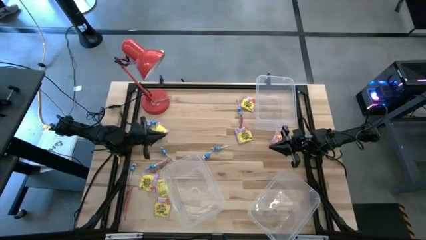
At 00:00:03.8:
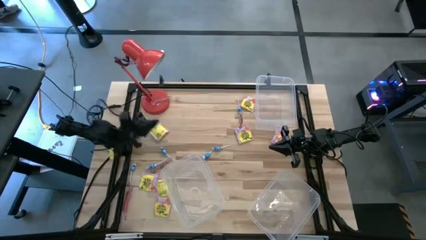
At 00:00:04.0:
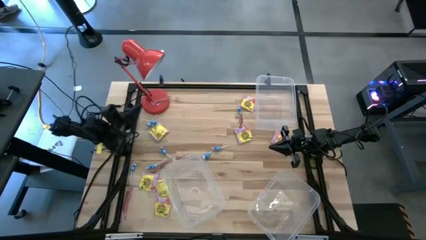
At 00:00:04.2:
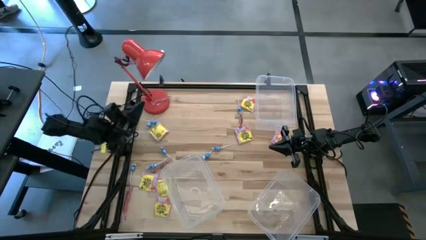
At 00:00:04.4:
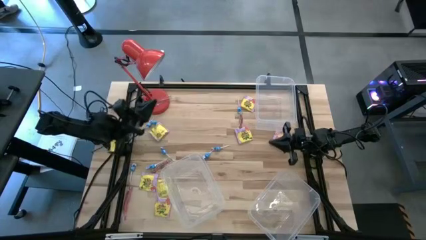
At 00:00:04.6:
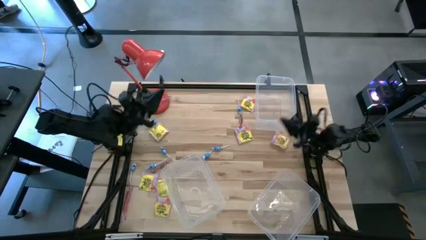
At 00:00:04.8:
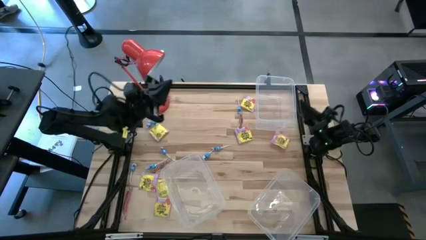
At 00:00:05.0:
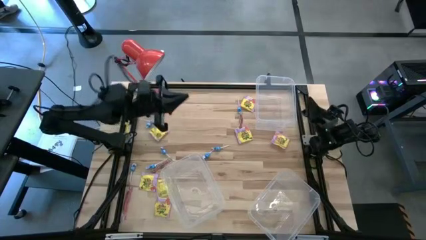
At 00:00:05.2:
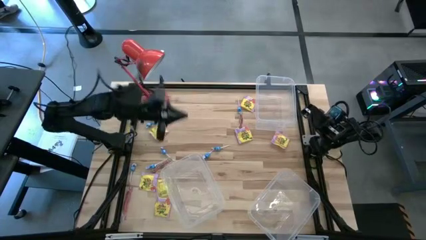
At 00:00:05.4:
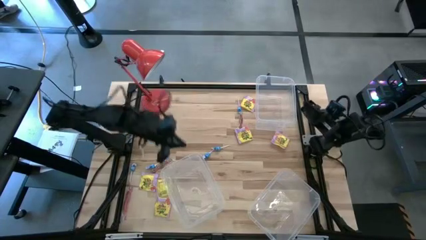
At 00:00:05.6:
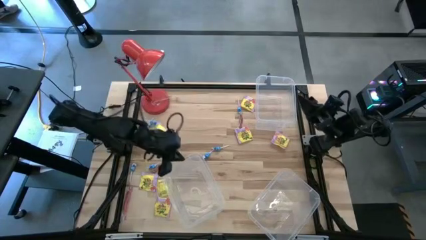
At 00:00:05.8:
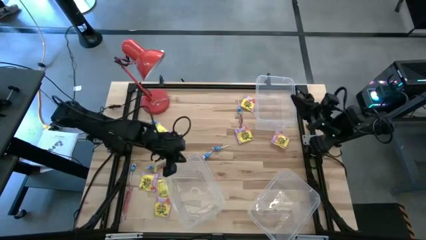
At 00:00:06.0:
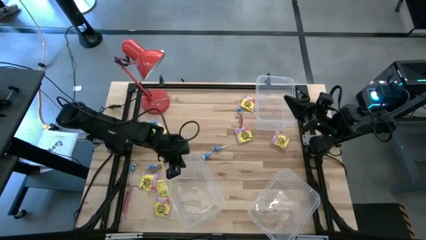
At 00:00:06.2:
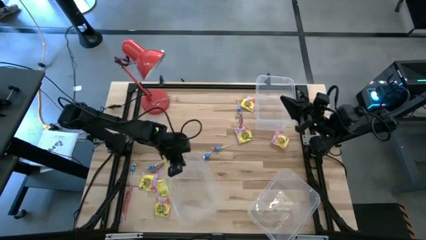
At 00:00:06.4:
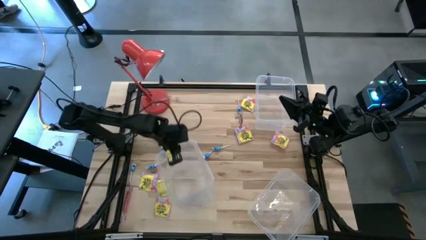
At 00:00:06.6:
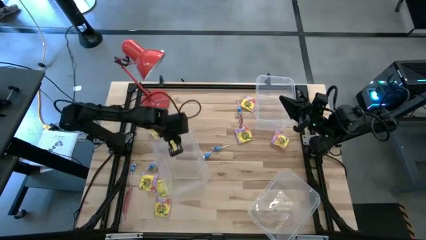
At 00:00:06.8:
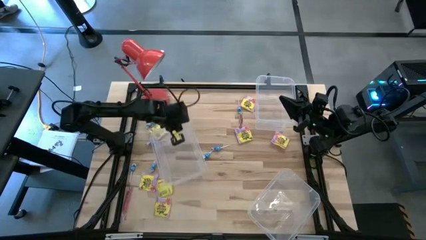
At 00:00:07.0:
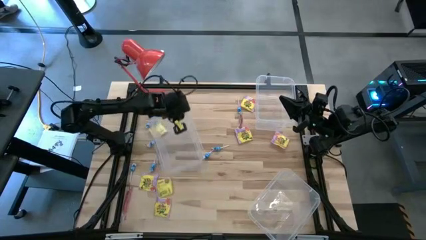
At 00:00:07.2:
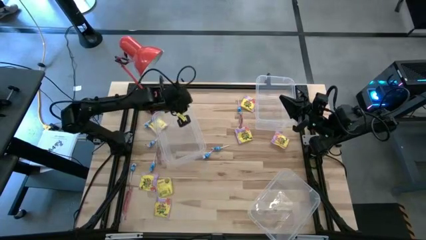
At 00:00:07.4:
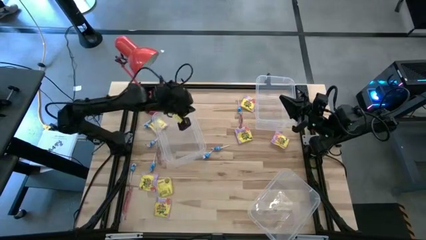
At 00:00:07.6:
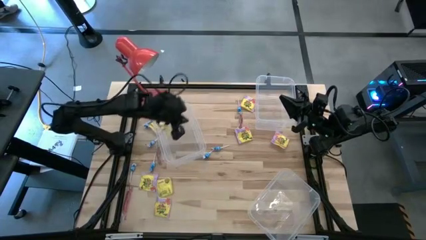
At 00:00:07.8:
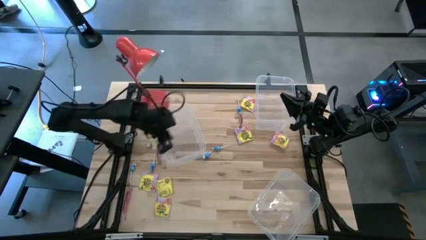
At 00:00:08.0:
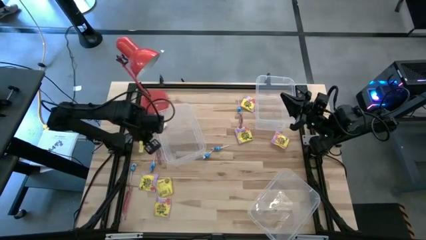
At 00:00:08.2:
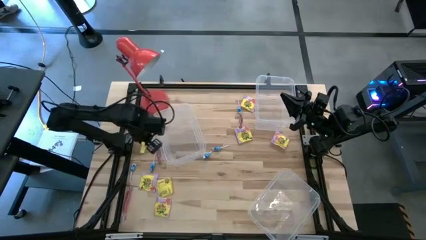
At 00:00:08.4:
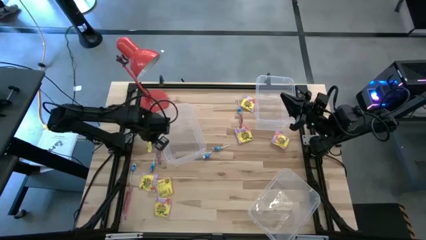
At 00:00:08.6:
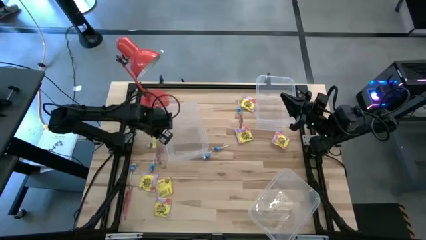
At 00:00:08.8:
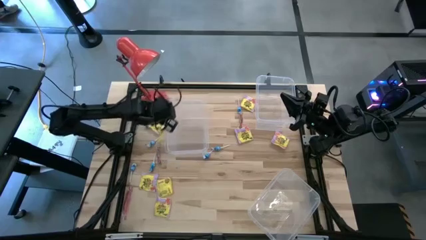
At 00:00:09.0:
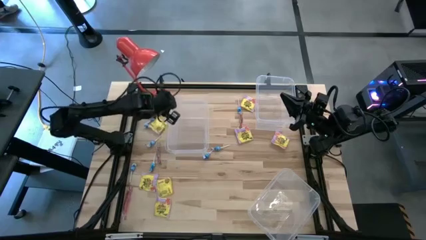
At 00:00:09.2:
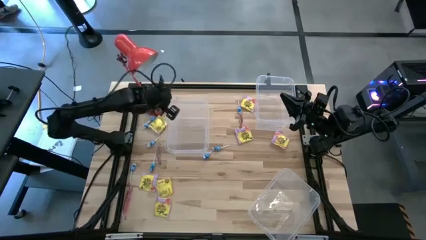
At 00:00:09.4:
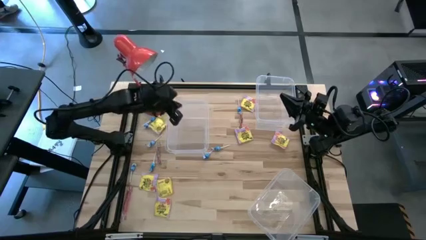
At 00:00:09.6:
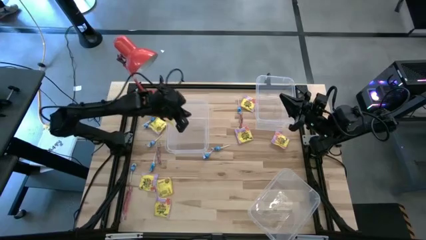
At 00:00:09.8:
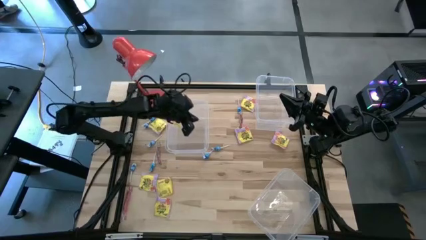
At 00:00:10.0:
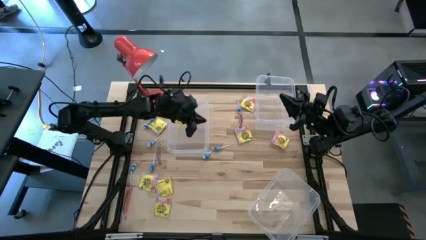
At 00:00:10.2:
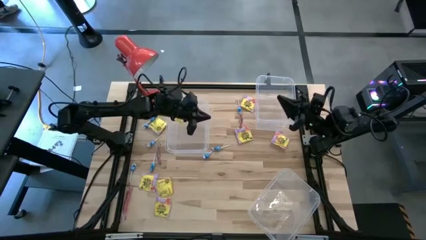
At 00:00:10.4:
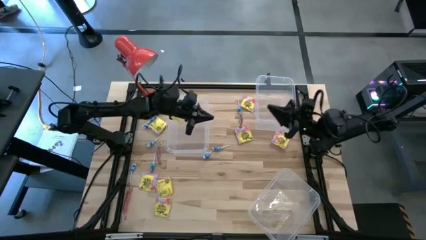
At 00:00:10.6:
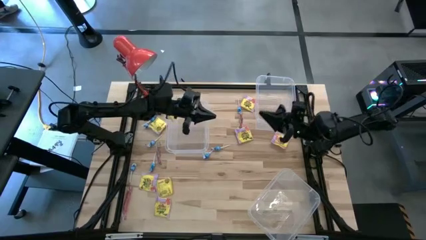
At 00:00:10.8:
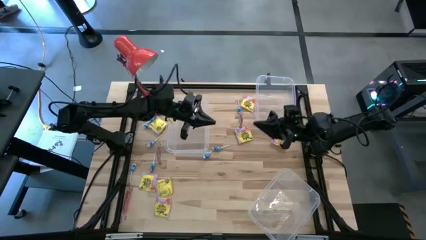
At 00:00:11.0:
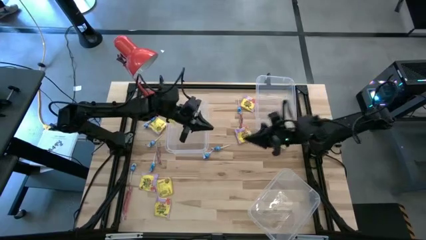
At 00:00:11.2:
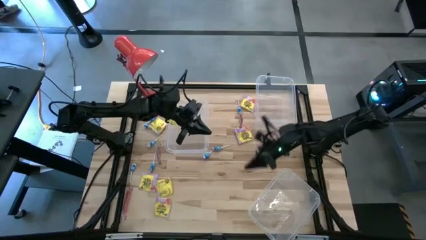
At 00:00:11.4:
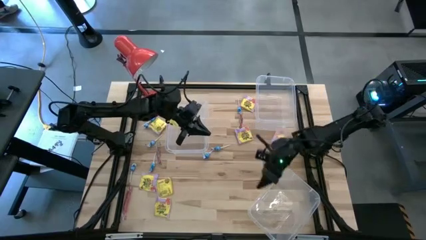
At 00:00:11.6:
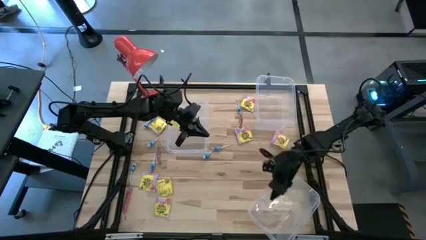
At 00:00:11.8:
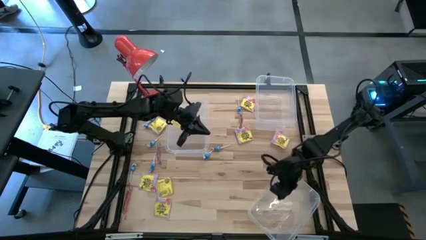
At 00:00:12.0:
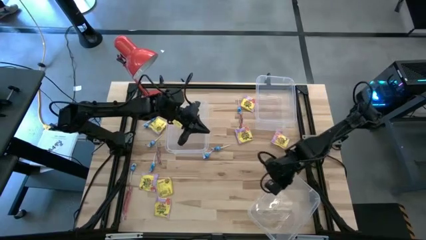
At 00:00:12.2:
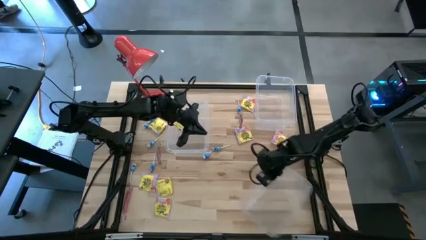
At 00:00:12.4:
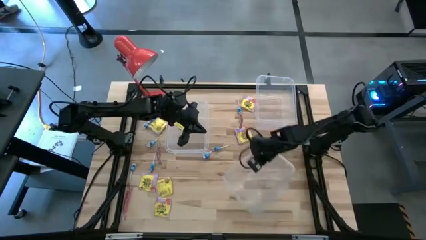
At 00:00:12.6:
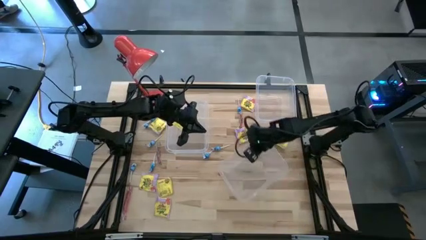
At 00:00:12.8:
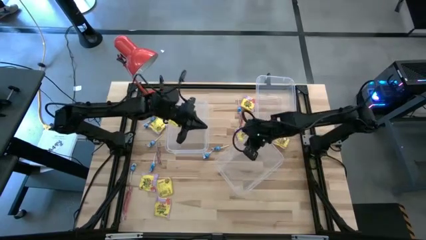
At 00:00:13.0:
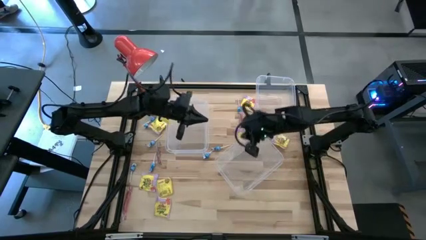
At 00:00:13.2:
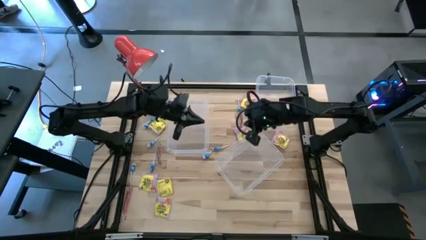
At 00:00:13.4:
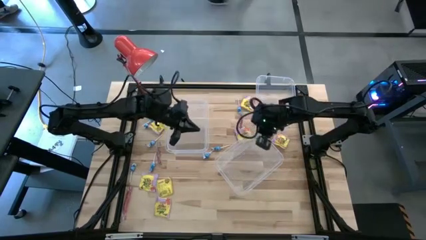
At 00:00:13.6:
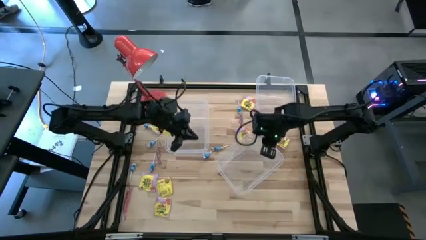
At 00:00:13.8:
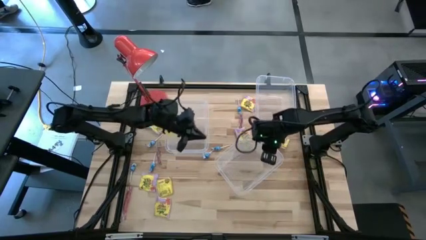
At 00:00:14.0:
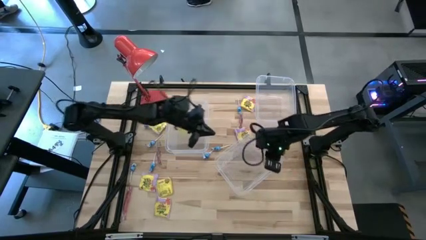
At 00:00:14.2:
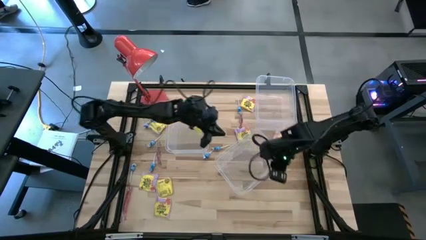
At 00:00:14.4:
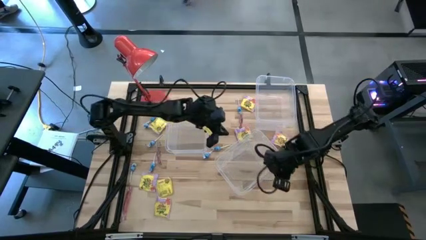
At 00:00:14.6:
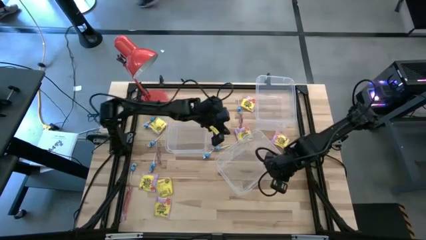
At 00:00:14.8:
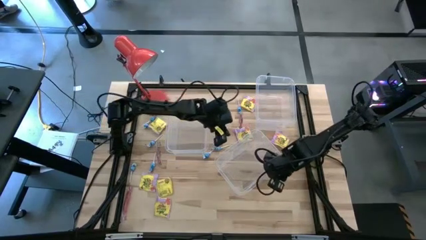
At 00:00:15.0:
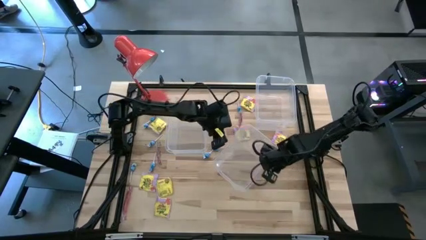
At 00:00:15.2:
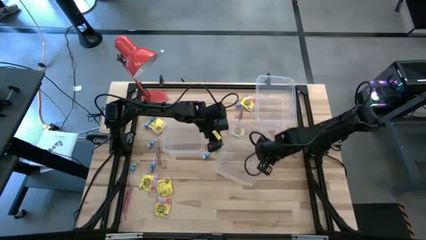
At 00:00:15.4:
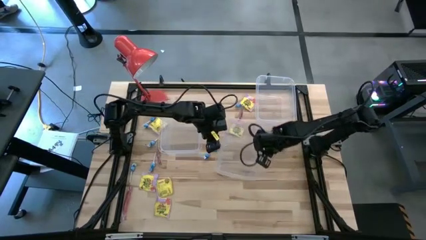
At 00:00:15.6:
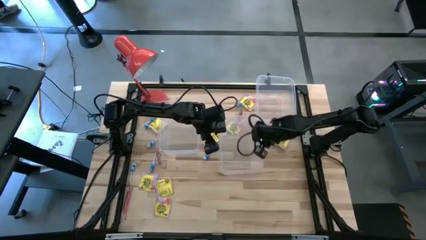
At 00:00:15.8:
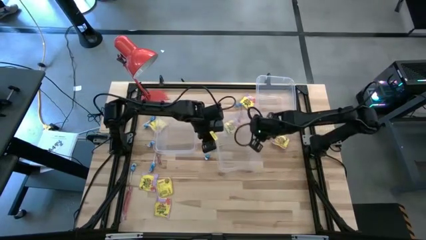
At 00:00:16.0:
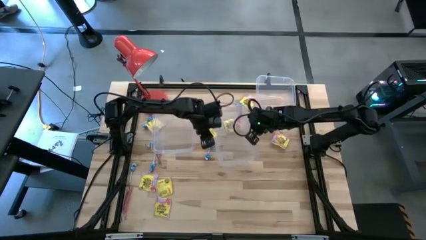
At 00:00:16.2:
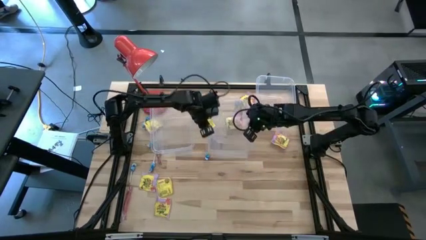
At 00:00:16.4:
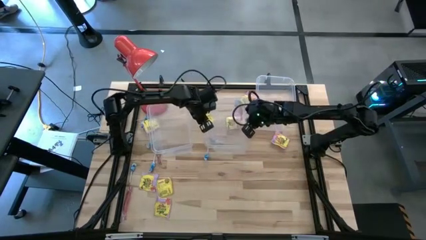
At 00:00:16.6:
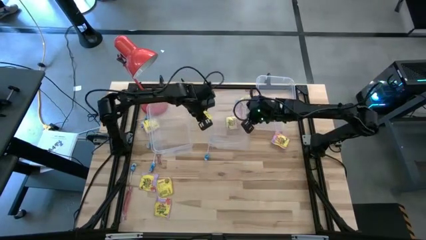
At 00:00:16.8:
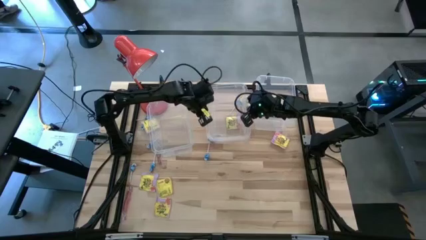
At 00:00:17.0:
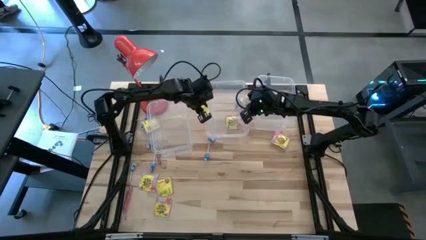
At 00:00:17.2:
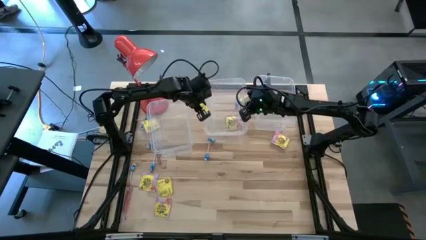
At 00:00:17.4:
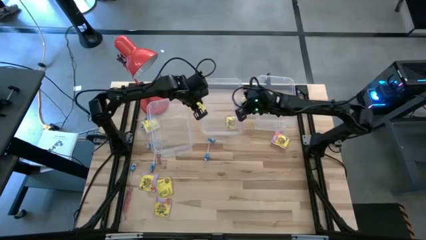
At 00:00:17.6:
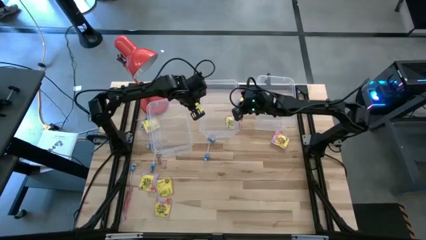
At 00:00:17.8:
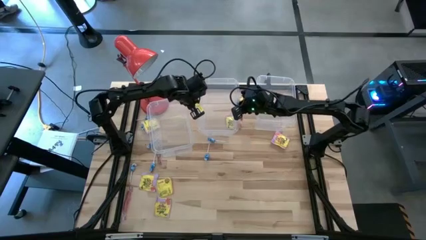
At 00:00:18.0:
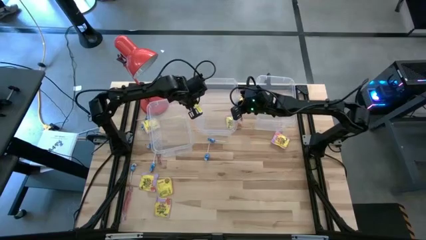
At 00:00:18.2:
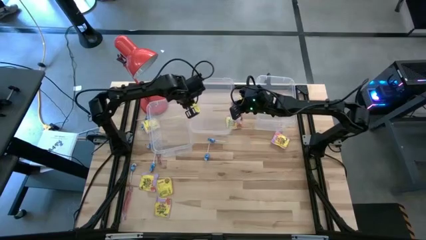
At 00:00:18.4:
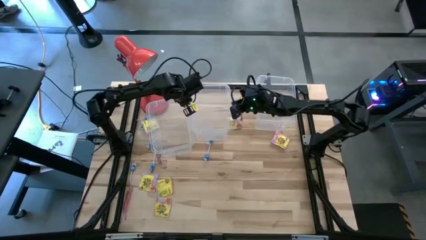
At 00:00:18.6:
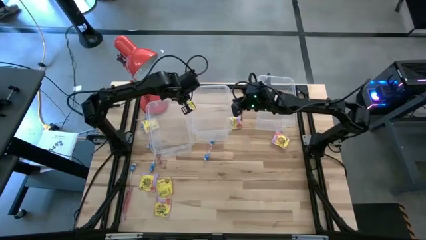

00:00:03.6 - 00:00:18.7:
Task: Sort candy
Move the left and bottom right transparent bins on top of the table

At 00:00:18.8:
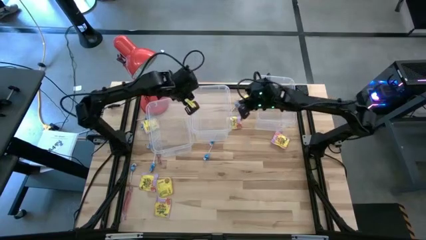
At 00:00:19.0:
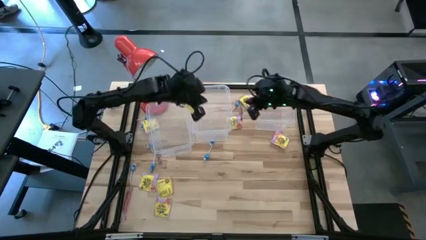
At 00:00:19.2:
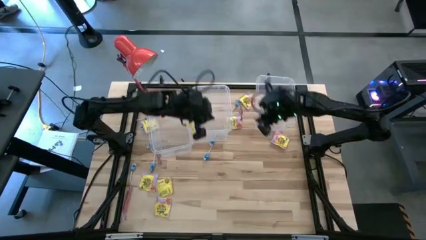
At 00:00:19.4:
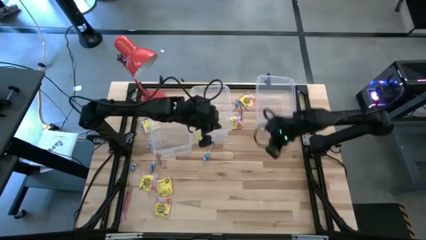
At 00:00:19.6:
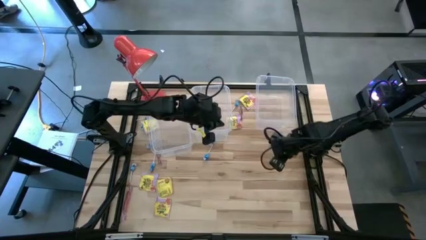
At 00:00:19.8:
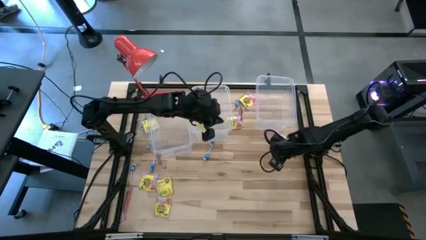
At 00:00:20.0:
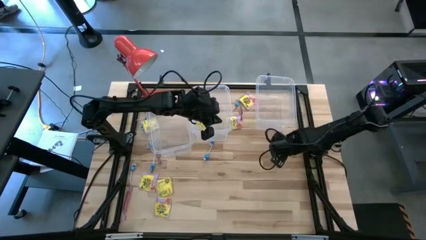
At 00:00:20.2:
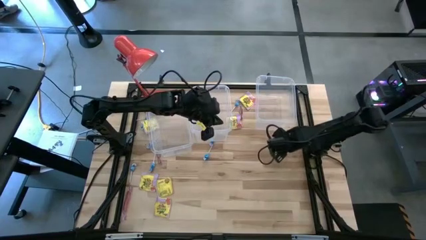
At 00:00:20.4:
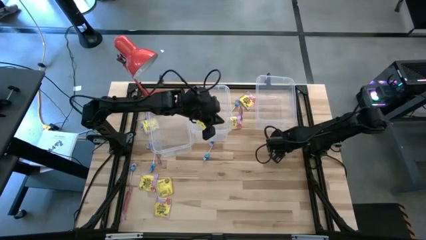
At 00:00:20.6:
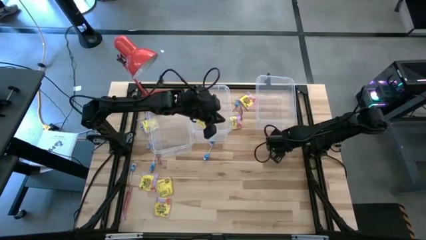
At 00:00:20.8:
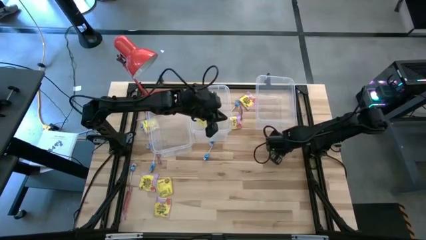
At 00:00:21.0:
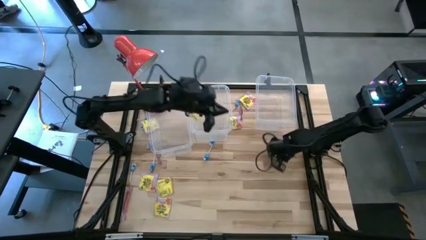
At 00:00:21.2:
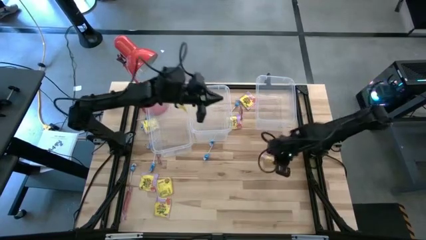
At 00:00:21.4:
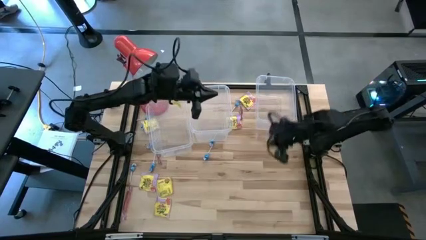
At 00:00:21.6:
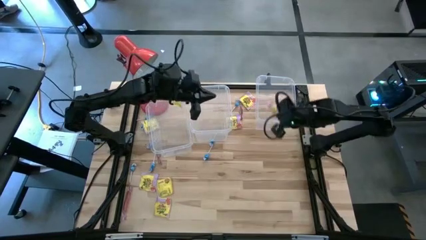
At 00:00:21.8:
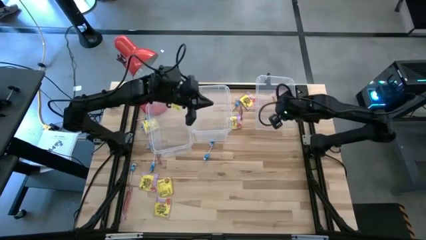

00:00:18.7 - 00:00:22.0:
Put the yellow candy into the right transparent bin
